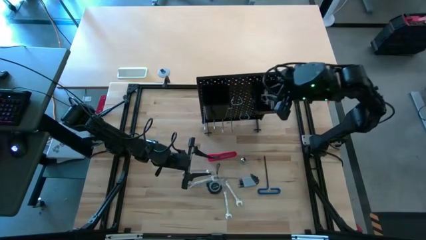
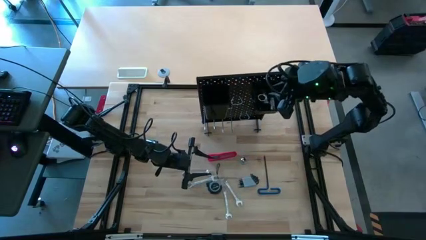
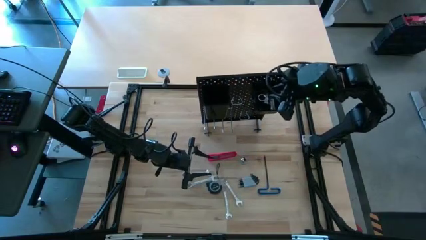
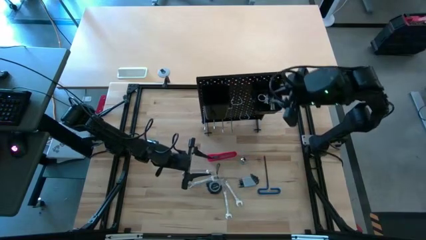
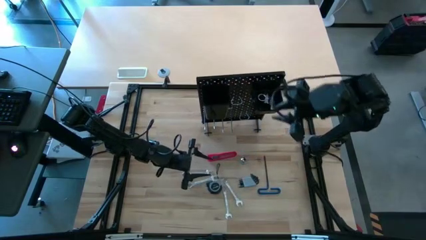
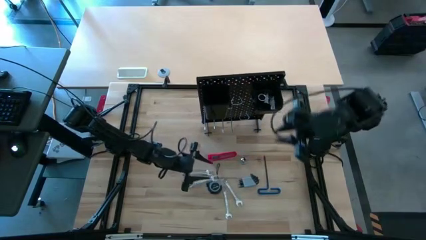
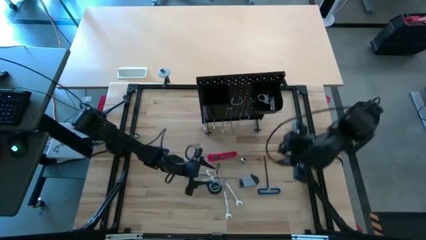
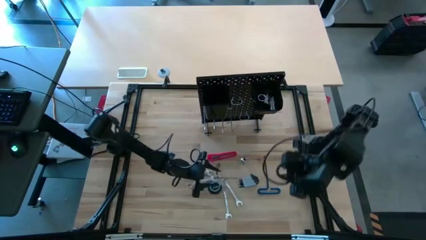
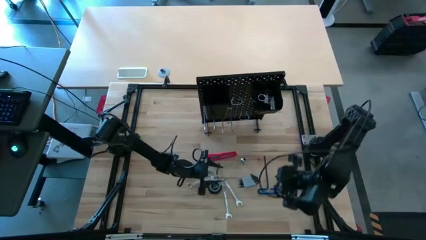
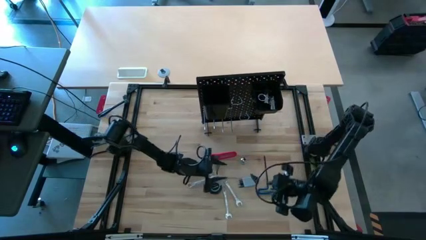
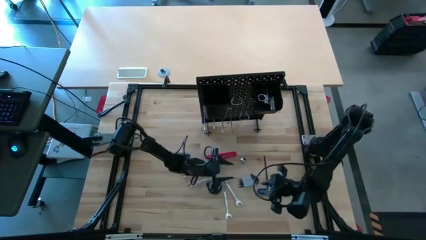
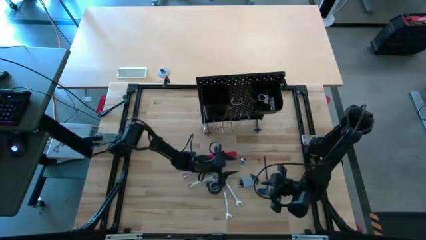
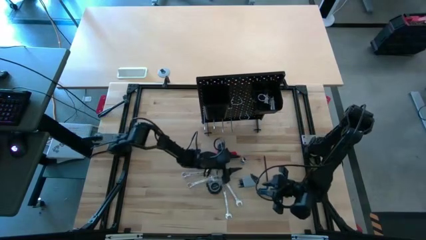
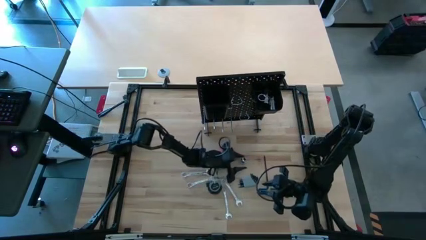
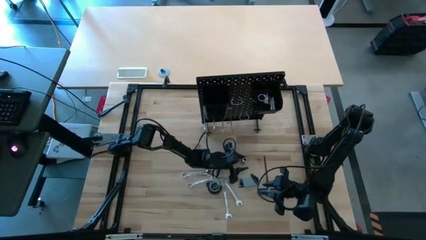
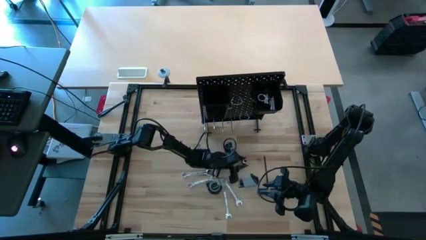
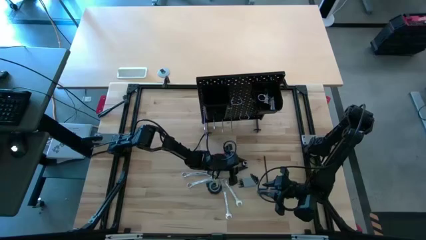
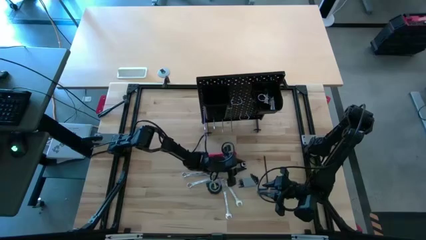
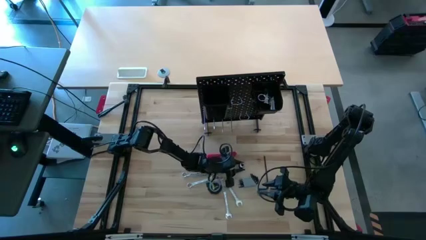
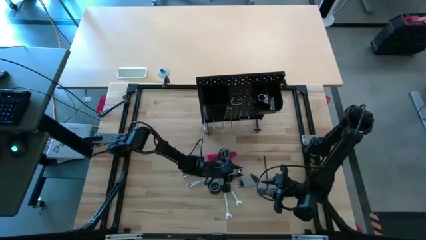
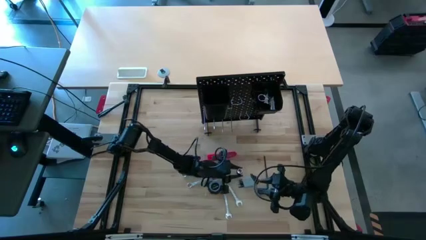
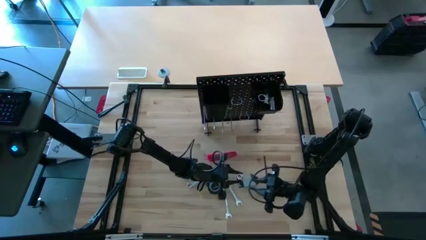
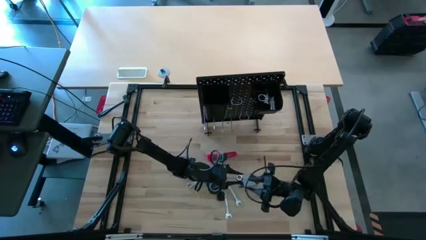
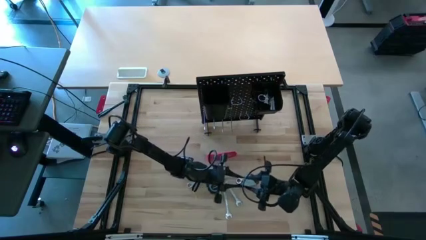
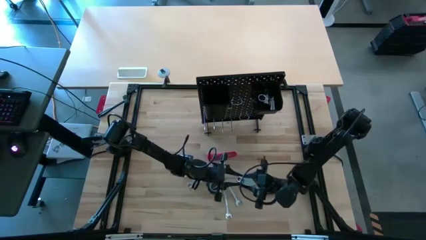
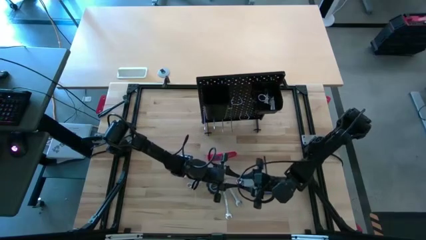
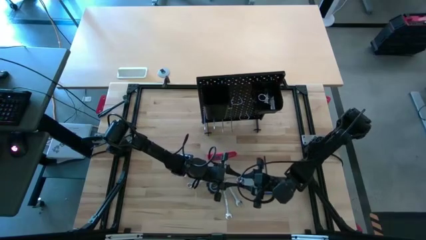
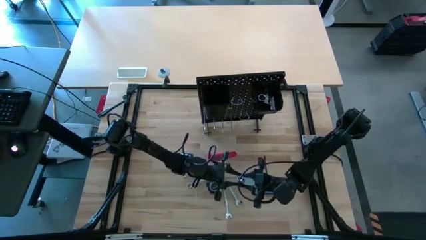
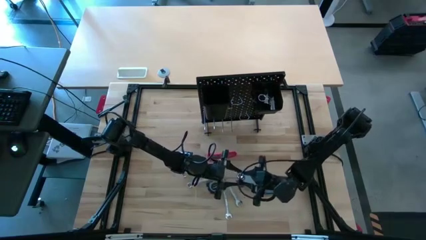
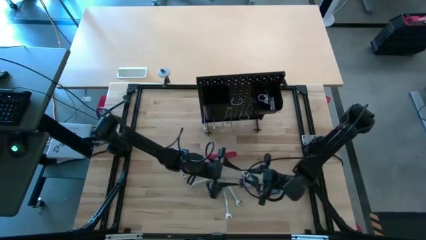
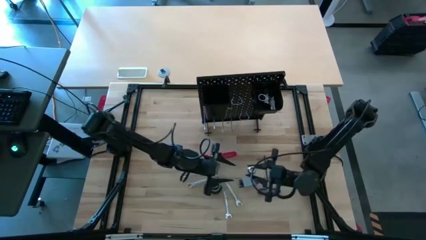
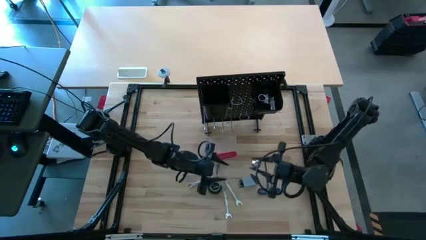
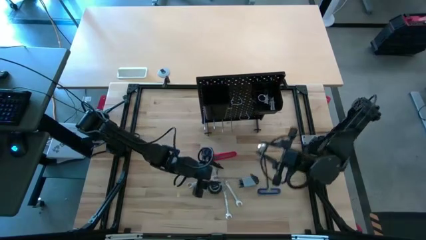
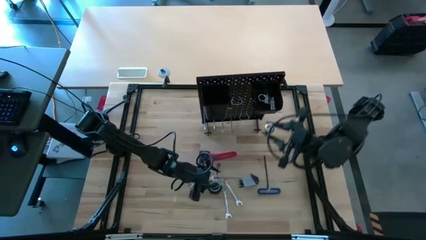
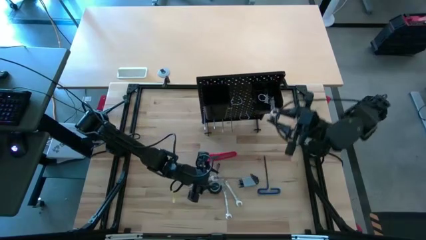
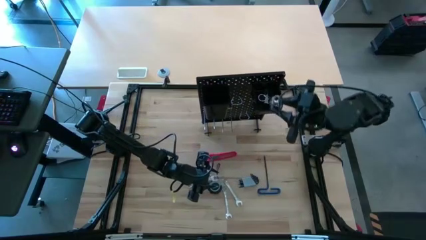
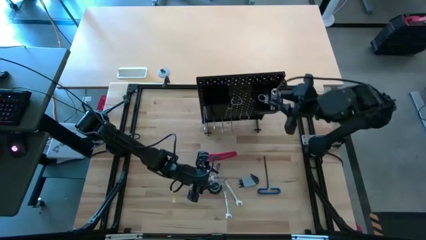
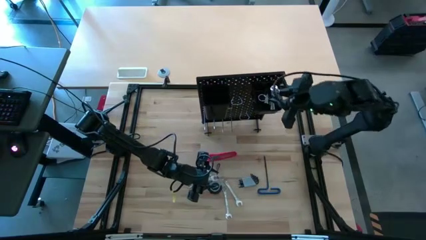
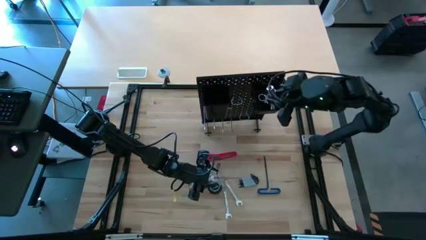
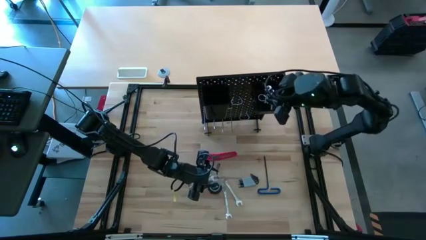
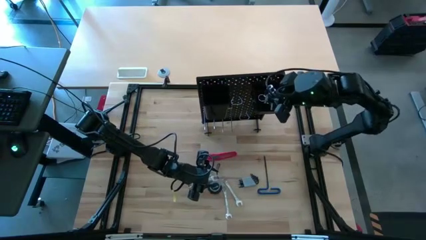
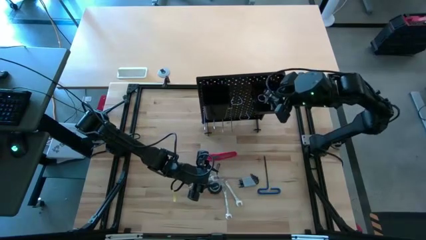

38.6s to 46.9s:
Task: Hang tools onto peg board
Put the socket into the peg board

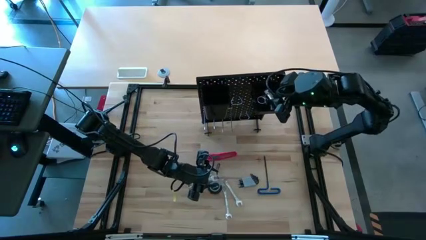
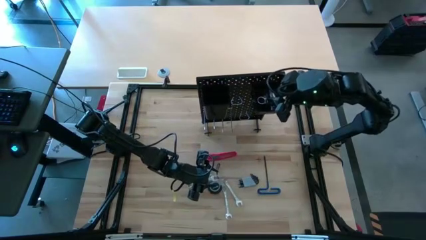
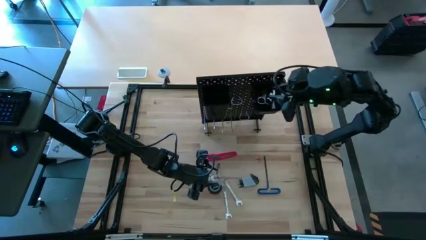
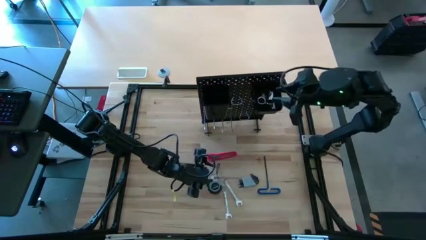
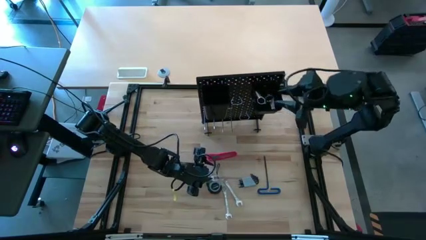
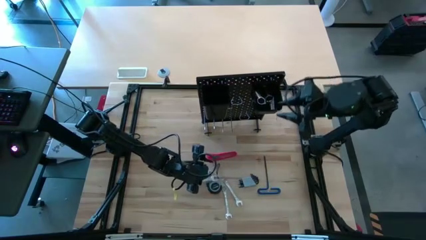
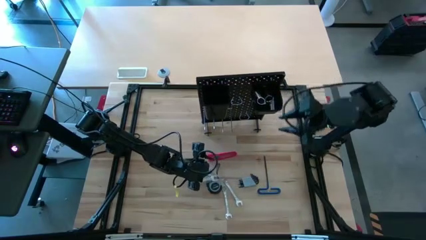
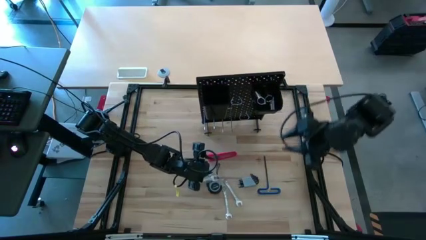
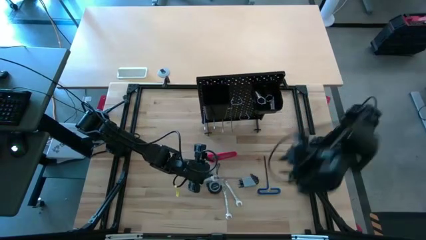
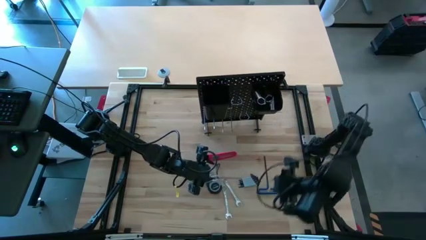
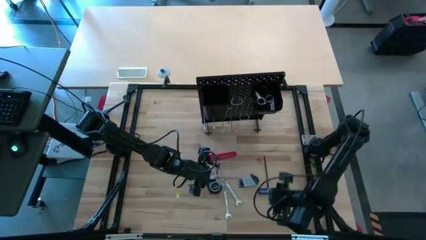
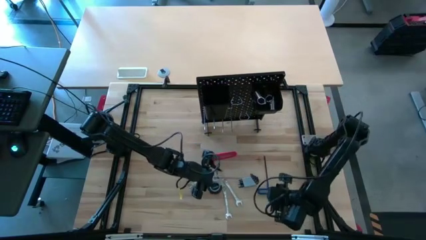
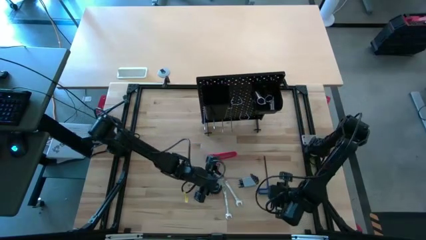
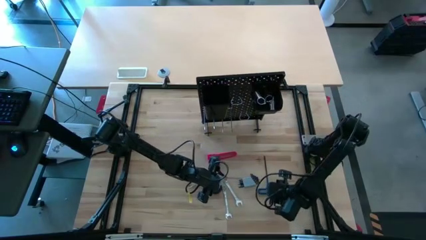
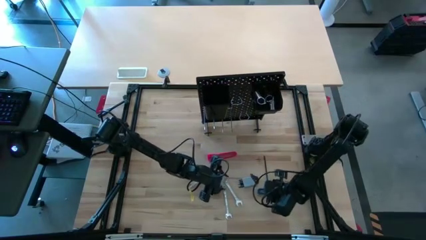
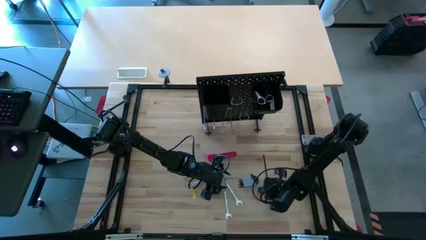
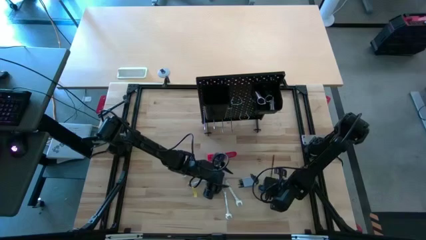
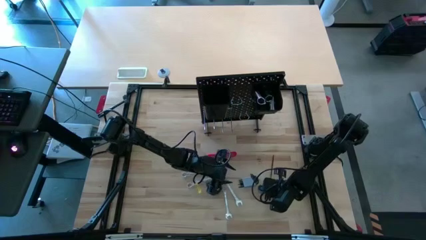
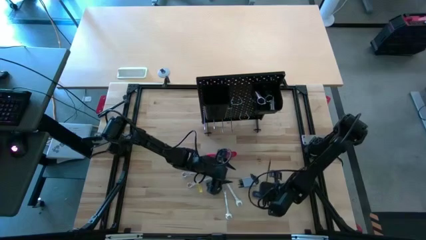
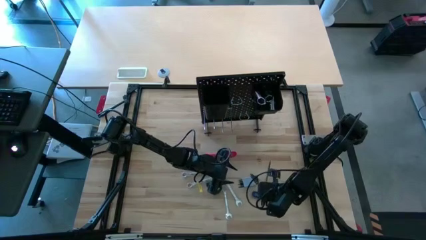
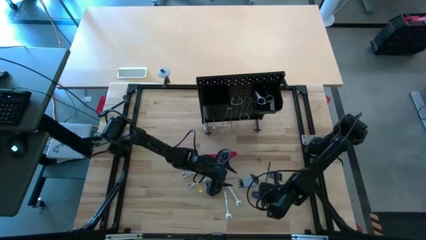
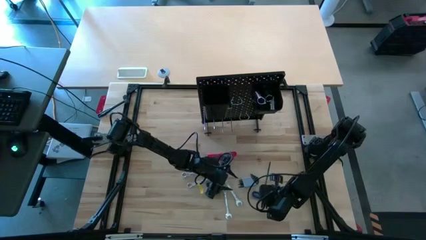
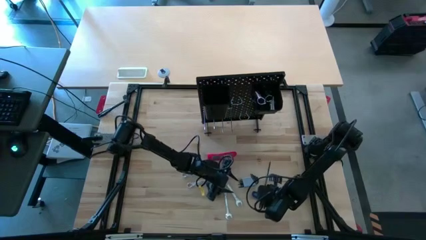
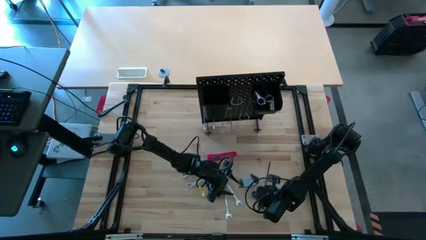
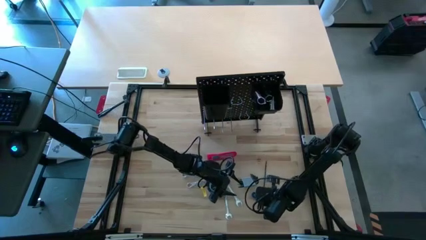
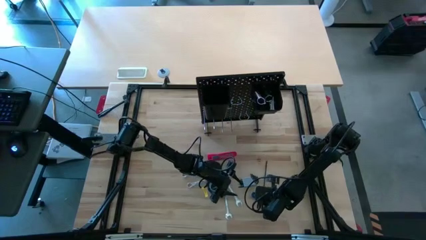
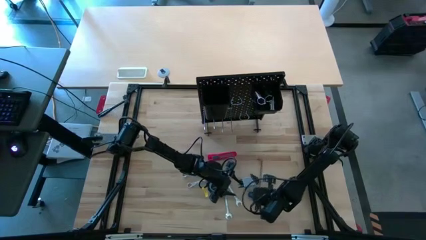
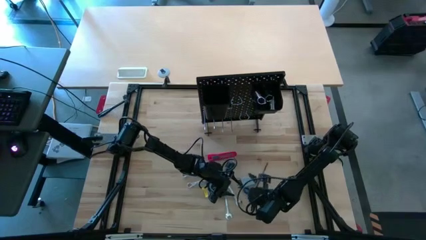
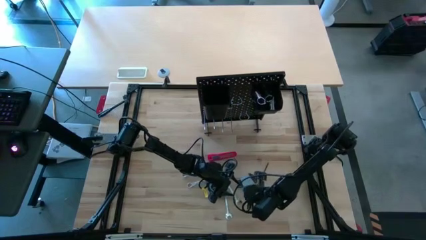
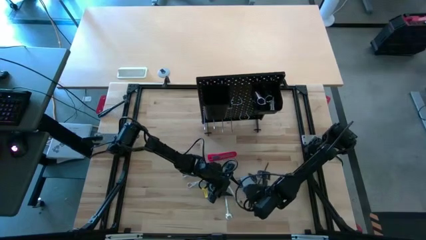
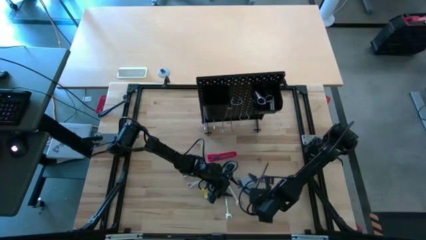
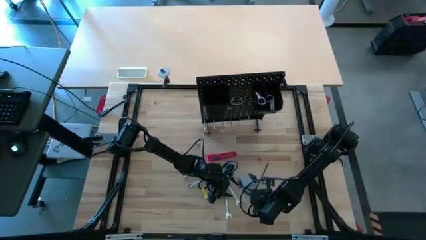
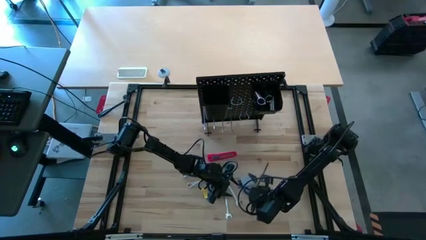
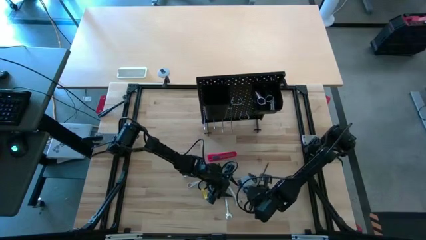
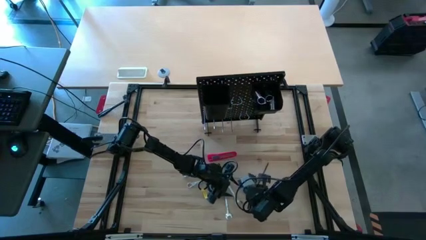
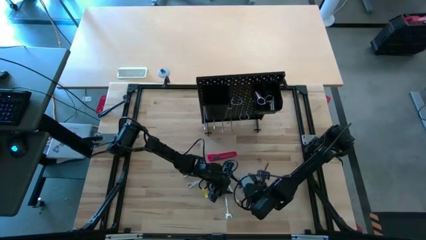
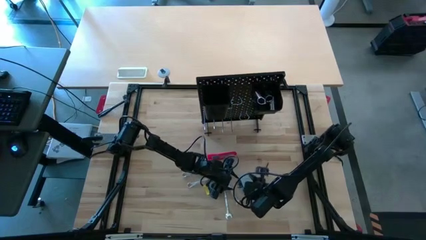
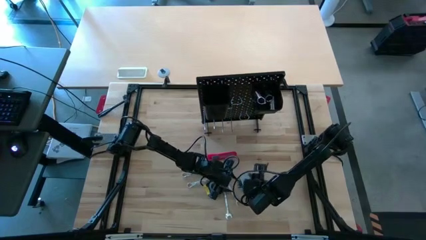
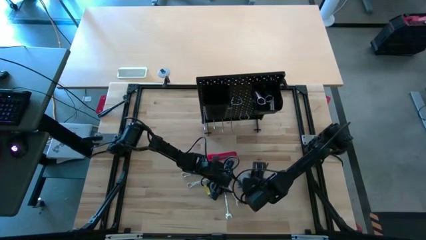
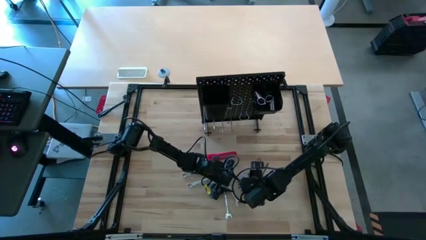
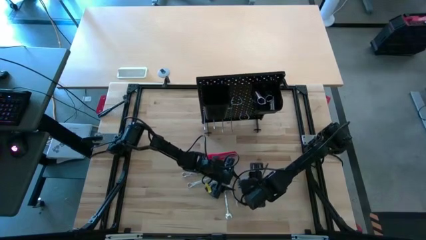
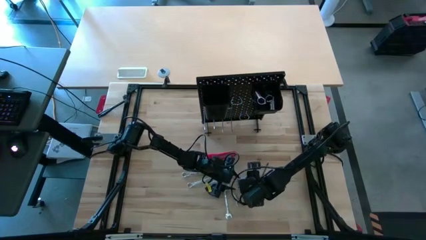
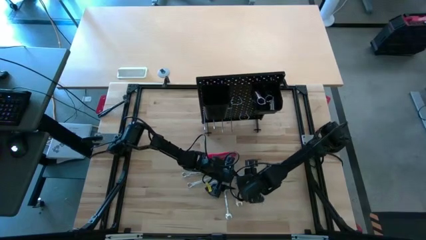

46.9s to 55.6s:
Put the pick tool into the peg board
